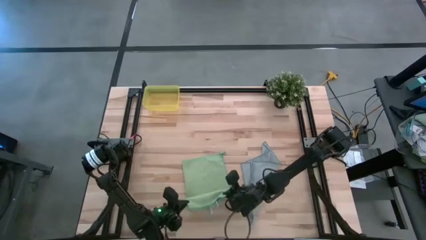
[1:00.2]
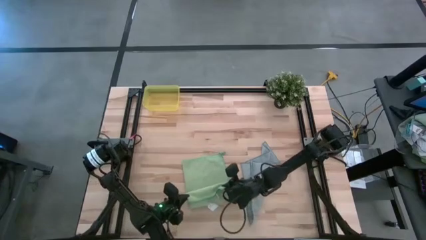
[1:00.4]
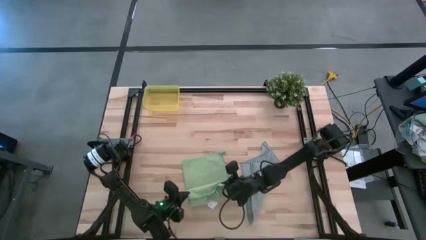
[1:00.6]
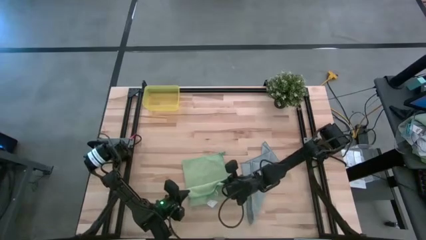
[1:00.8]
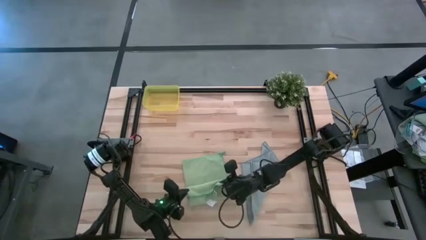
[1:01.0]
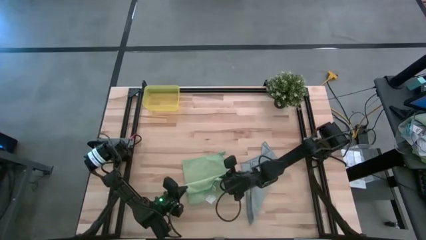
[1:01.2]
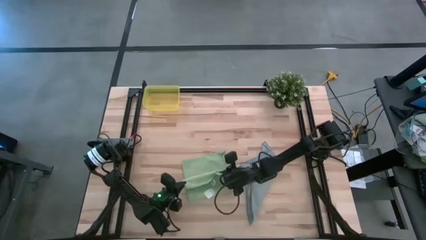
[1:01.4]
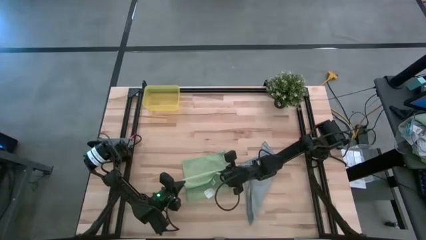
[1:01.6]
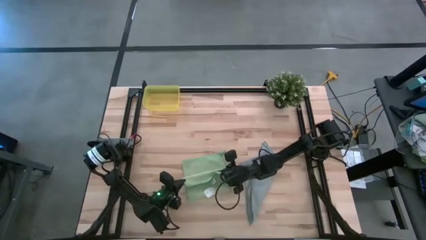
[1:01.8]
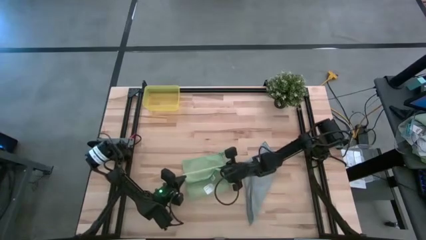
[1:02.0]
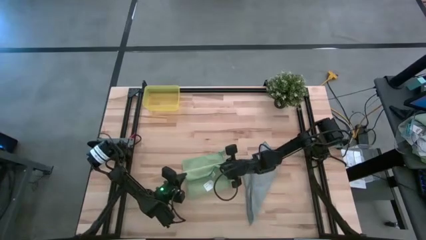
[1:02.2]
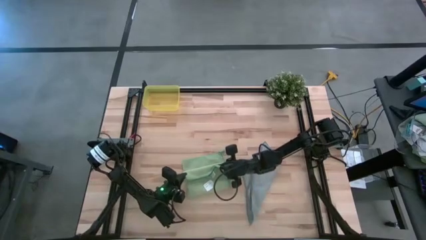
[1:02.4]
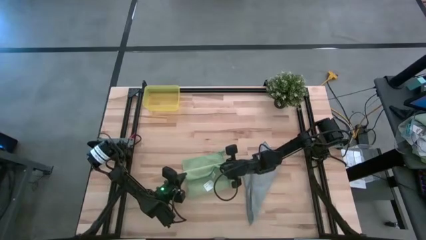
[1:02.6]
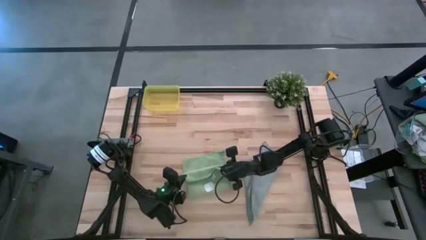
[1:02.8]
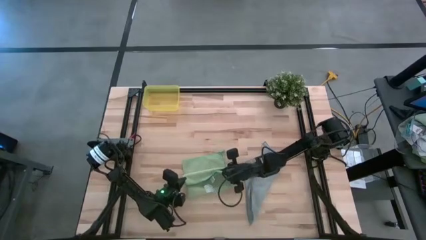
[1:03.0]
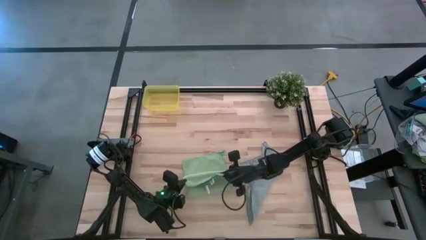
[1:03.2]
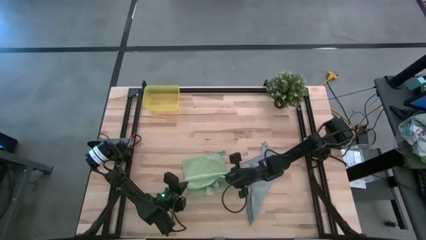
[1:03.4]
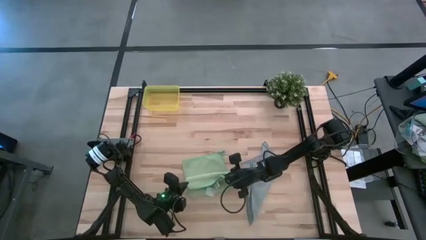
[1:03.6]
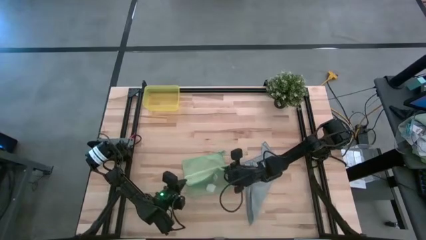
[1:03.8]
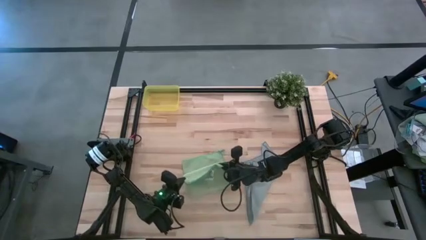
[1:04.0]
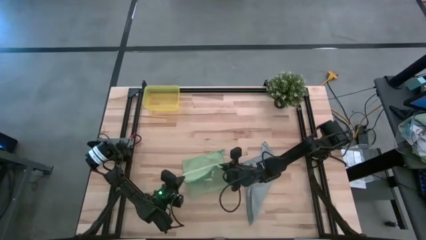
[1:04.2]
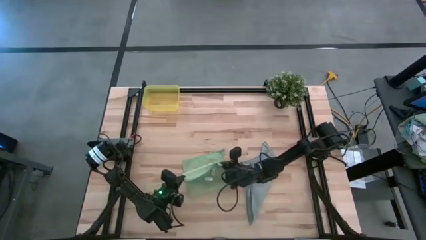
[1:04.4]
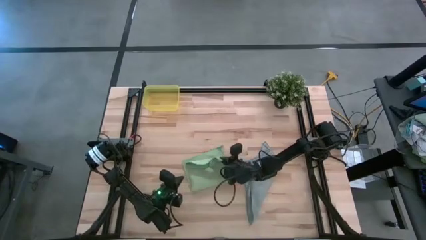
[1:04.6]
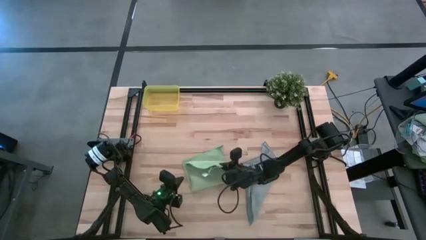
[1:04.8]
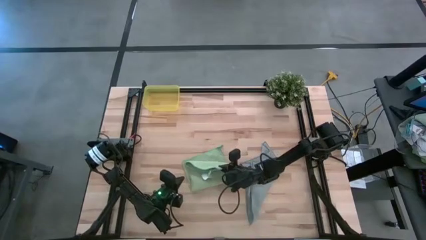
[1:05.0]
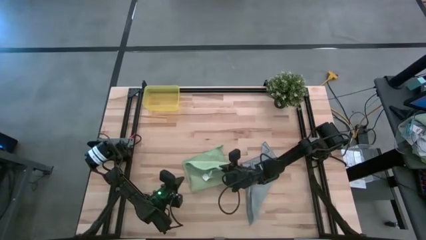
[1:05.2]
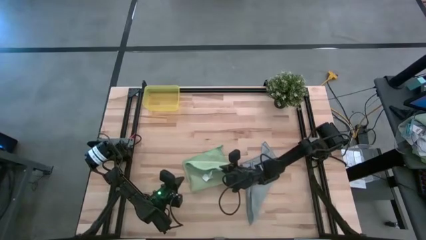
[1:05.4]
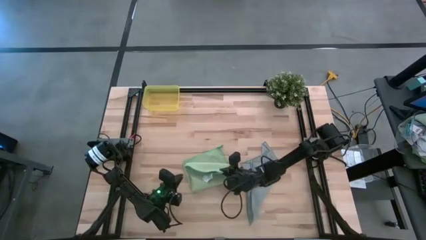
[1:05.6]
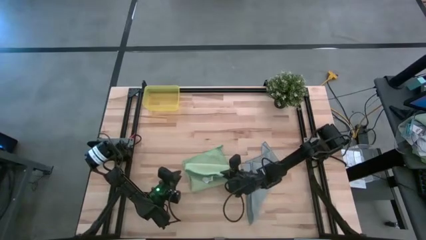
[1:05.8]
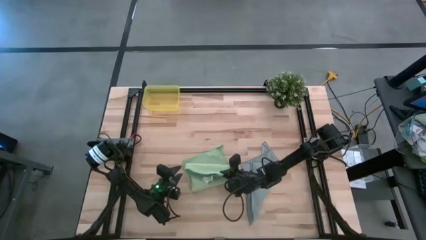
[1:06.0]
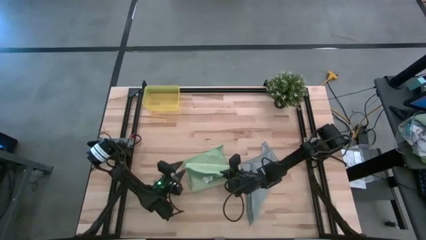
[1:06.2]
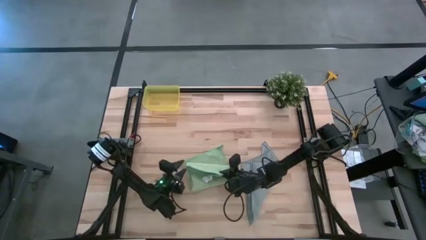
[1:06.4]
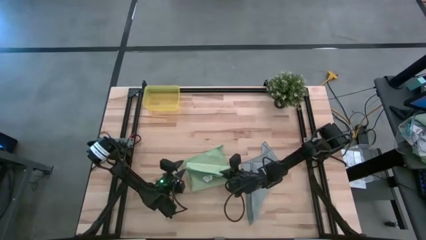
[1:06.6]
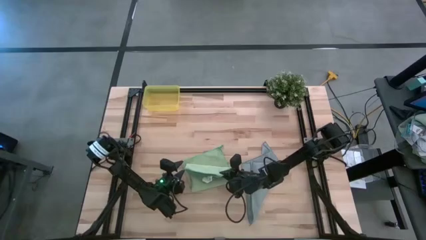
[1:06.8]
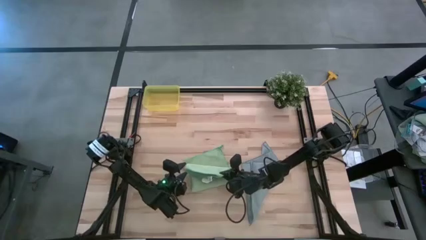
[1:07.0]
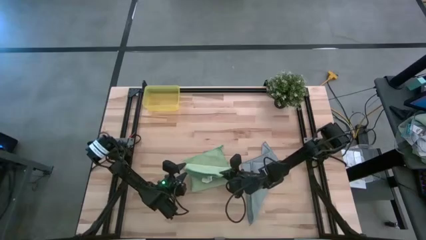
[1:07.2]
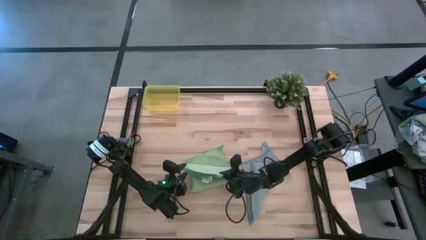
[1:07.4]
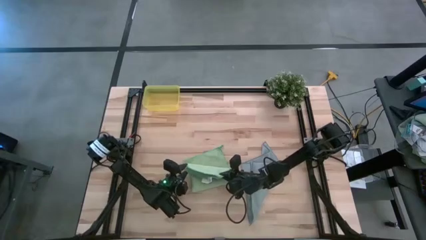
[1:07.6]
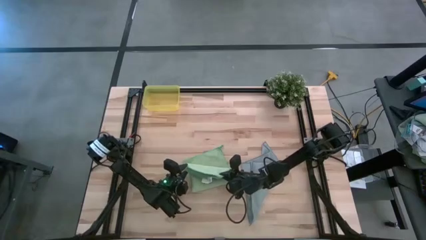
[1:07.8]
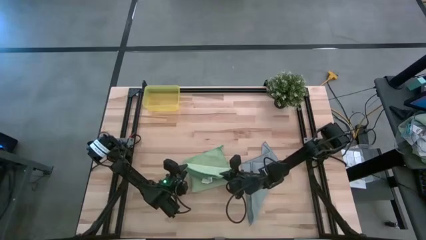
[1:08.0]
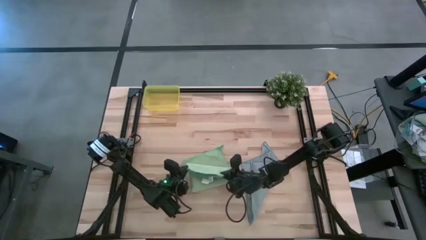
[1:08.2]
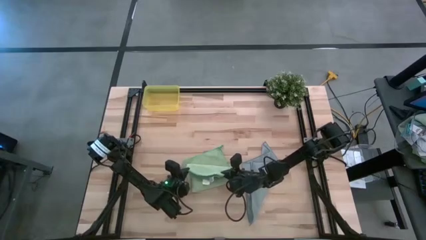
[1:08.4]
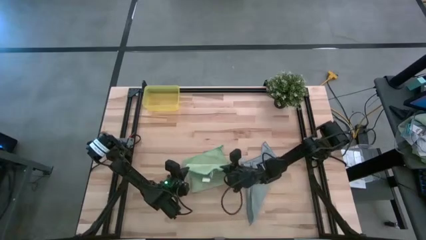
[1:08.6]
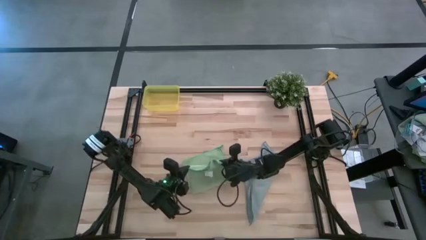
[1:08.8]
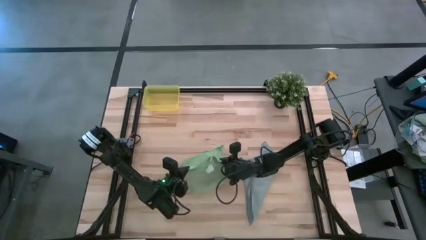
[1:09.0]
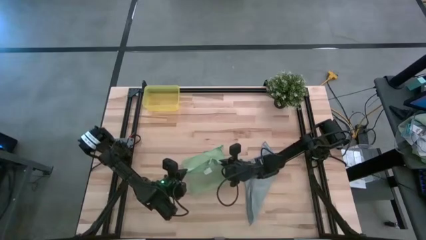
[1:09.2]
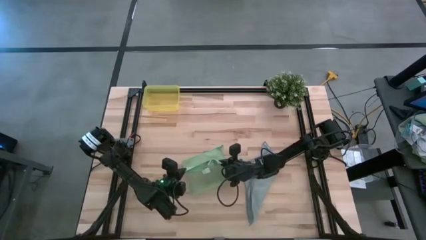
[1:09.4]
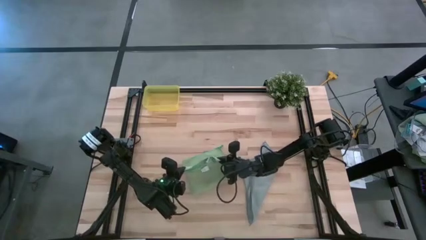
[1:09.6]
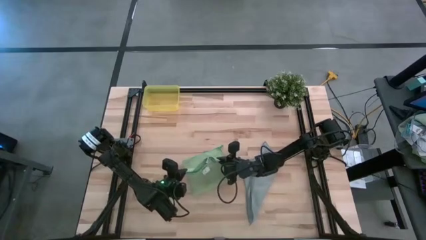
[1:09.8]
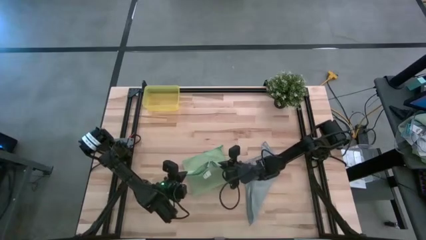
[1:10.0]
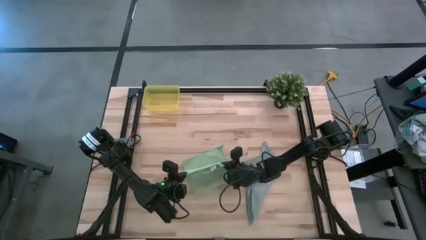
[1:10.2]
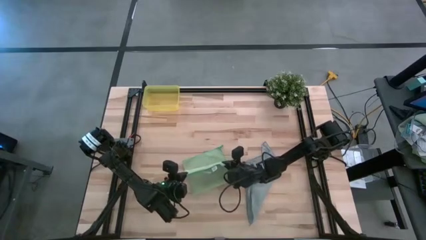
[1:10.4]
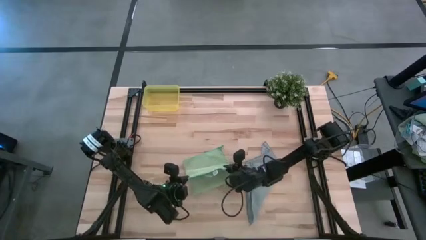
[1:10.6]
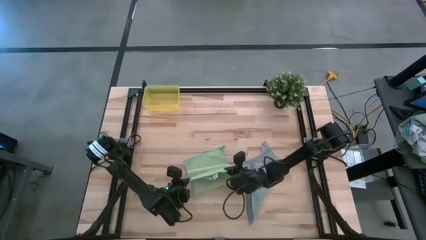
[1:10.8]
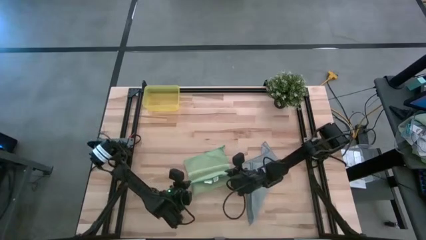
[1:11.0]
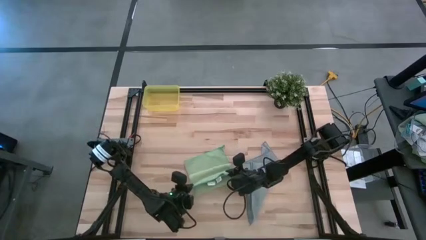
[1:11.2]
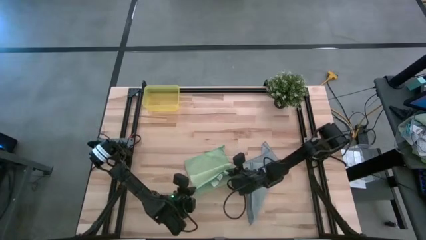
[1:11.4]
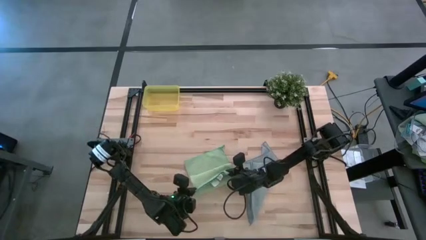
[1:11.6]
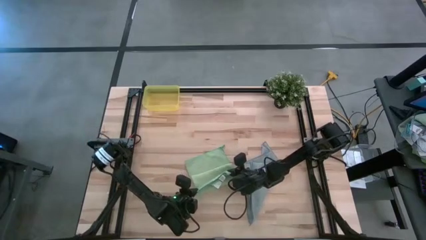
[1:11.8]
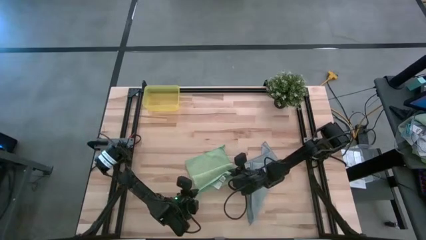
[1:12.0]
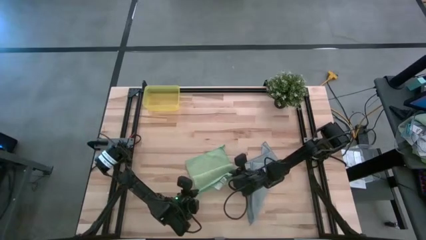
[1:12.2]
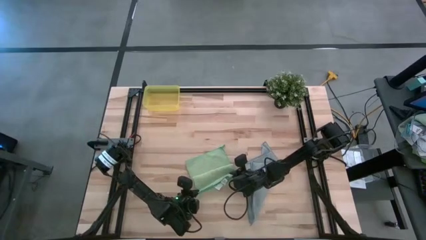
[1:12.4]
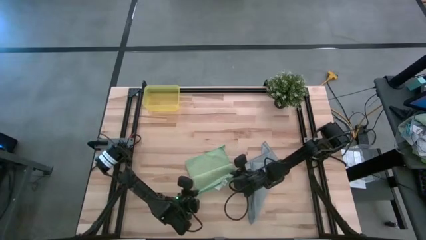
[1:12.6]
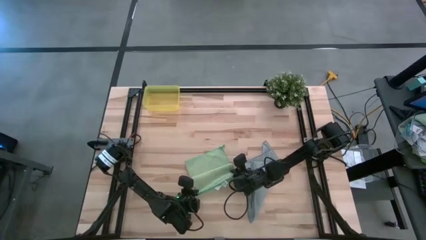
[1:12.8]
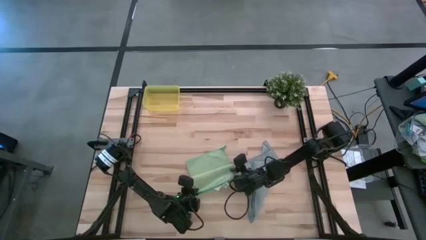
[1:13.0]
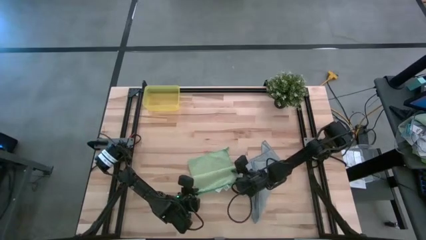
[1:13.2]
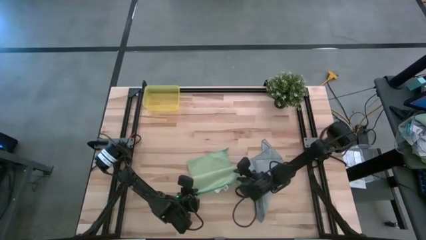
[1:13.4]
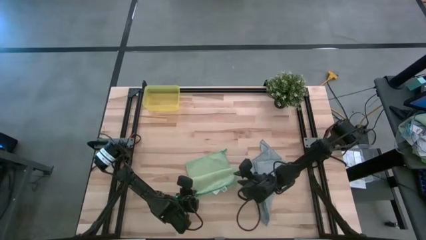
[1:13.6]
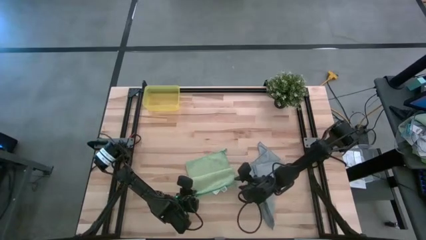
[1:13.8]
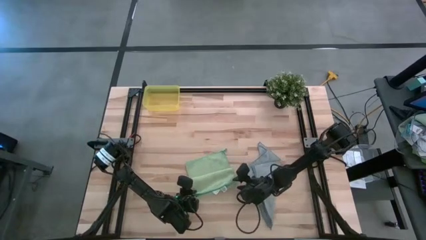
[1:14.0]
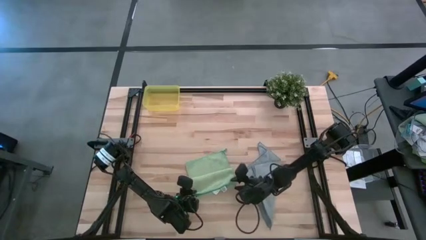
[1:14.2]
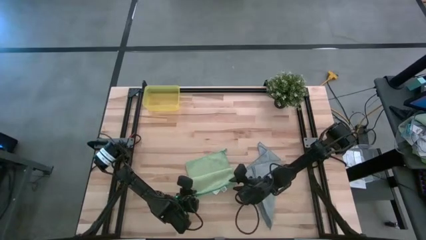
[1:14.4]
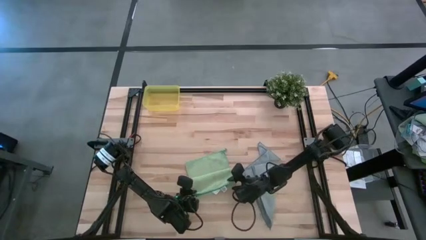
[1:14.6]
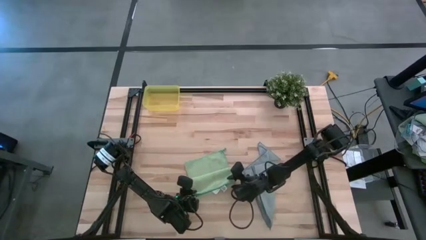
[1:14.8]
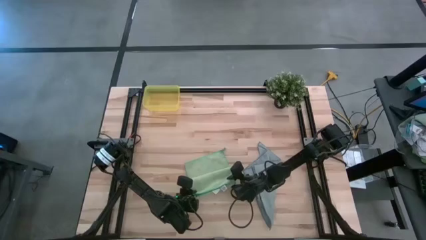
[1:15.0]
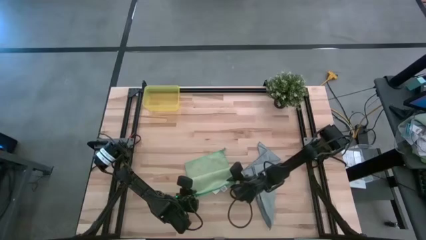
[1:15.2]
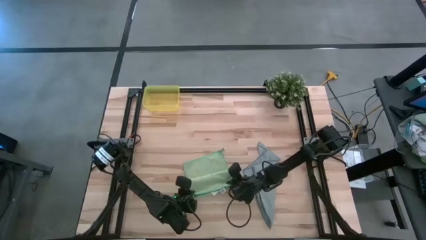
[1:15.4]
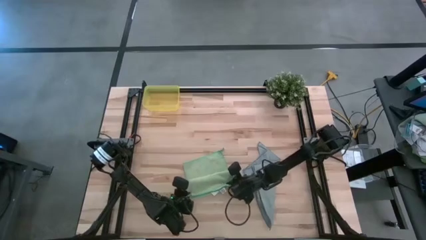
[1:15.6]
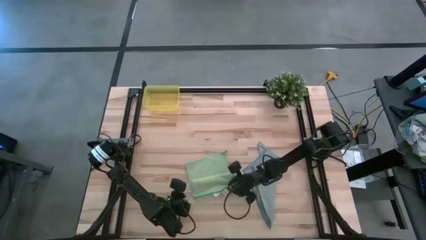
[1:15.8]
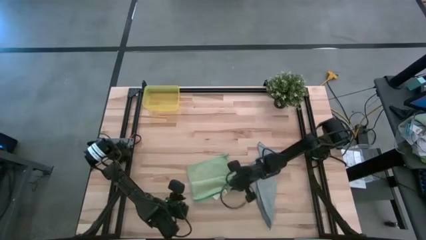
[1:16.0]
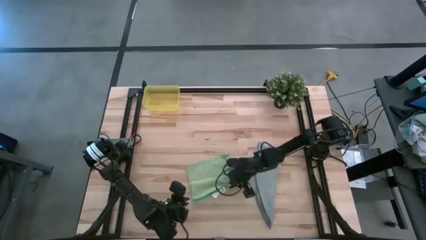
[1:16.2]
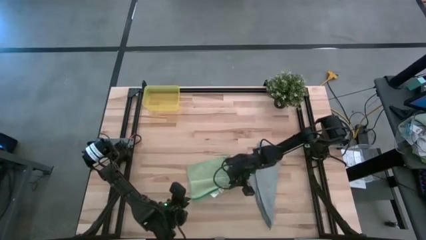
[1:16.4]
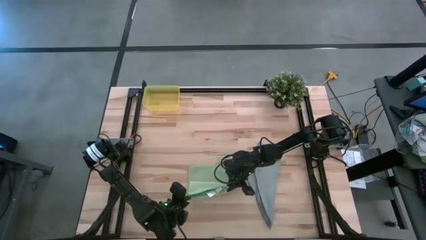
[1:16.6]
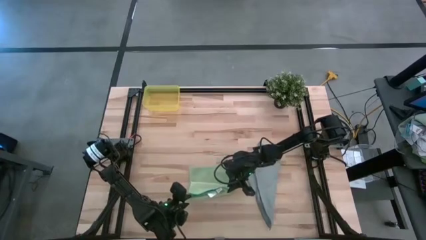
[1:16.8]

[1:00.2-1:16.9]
Task: Roll microfiber towels into tight, uniform cylinder then place into a basket
Roll the green towel
